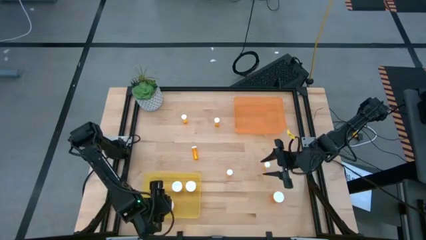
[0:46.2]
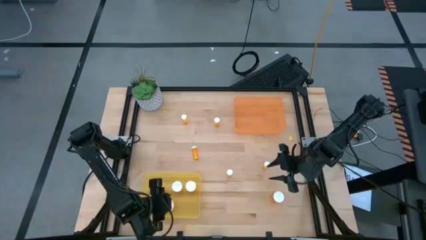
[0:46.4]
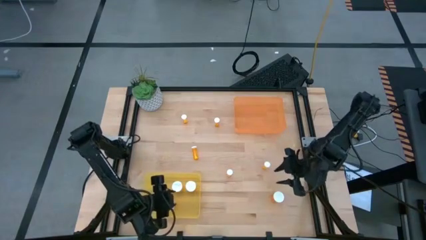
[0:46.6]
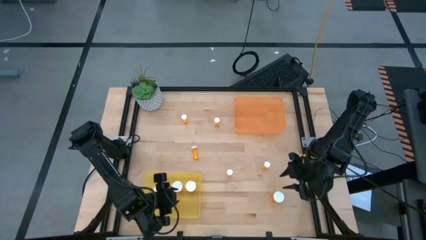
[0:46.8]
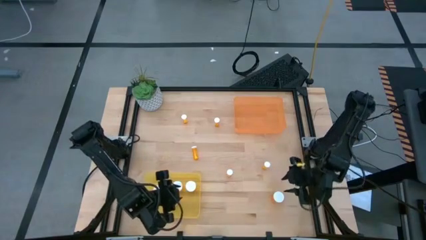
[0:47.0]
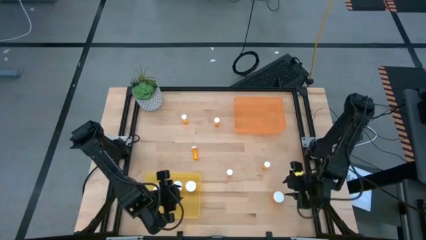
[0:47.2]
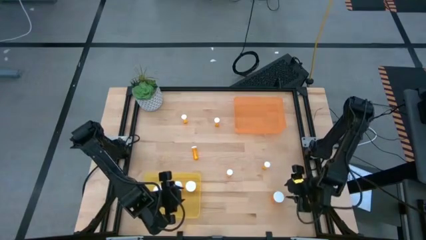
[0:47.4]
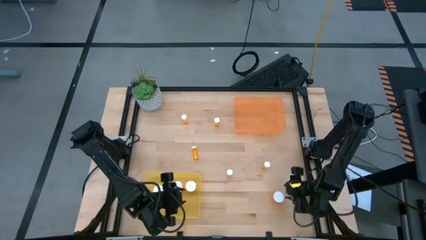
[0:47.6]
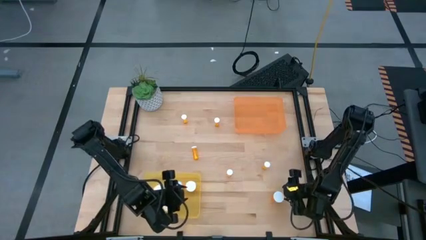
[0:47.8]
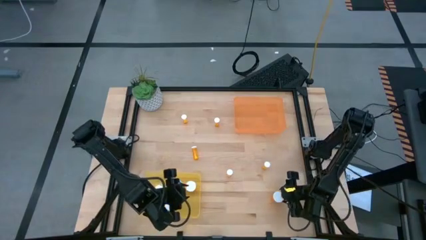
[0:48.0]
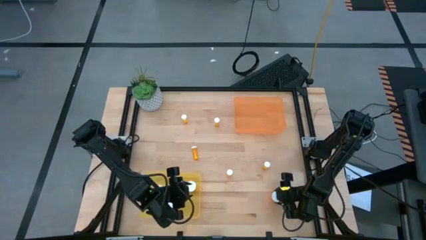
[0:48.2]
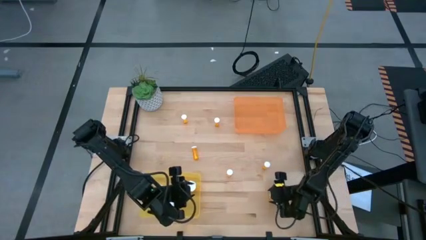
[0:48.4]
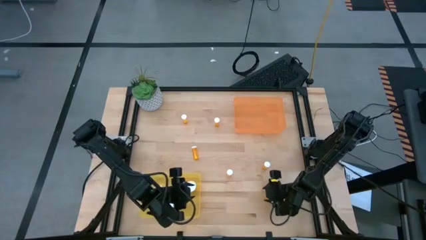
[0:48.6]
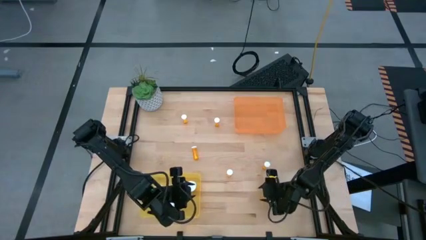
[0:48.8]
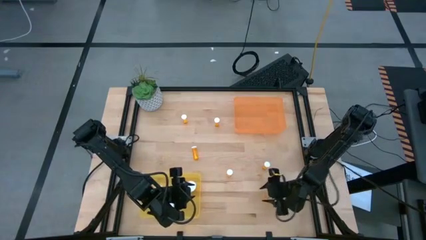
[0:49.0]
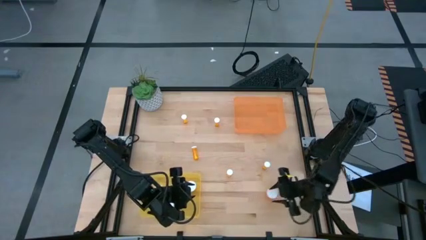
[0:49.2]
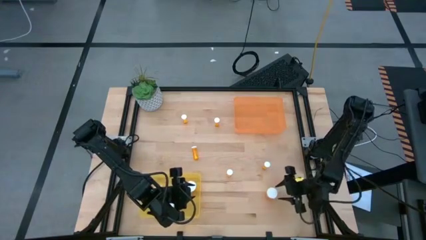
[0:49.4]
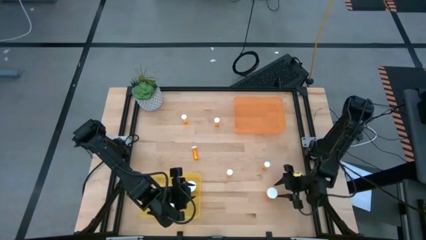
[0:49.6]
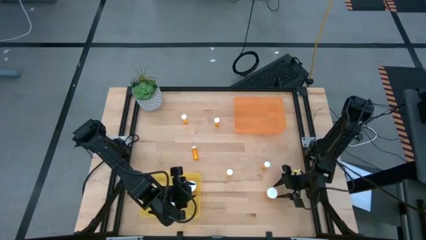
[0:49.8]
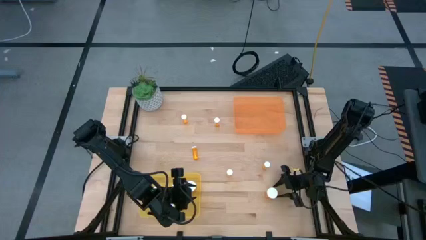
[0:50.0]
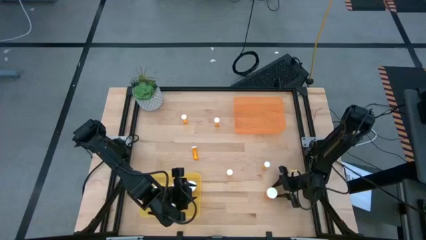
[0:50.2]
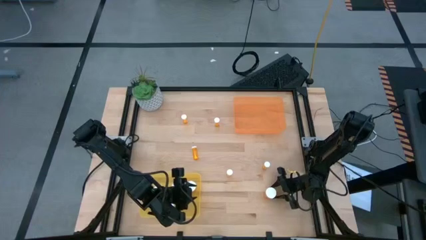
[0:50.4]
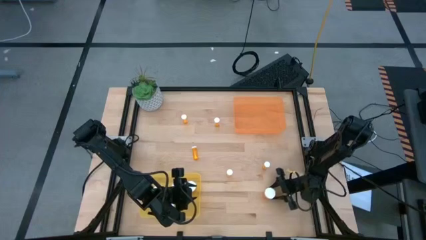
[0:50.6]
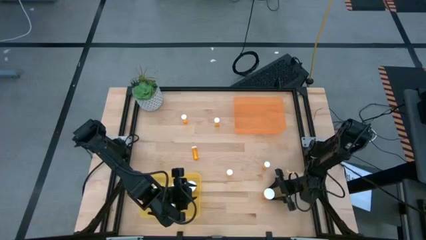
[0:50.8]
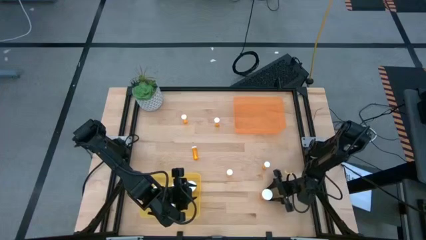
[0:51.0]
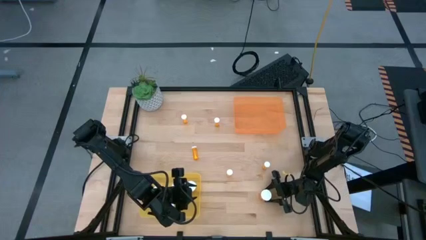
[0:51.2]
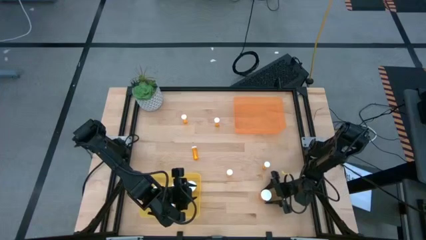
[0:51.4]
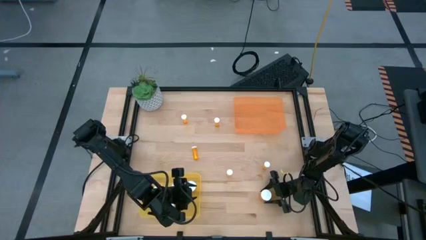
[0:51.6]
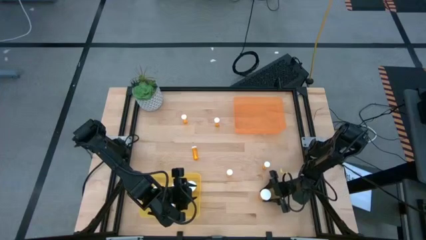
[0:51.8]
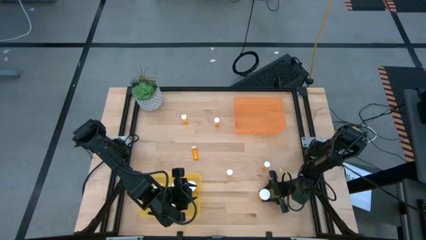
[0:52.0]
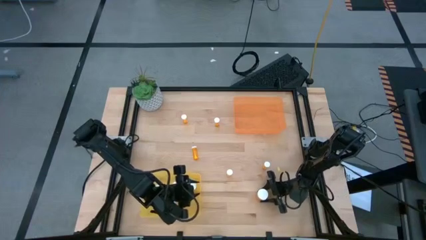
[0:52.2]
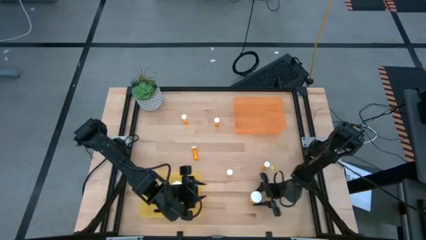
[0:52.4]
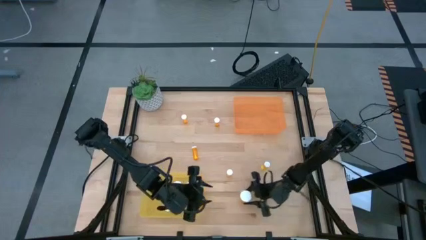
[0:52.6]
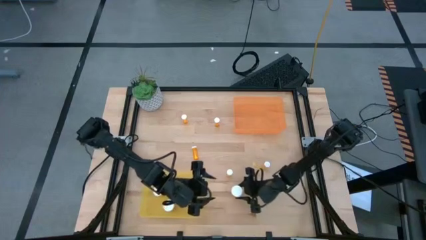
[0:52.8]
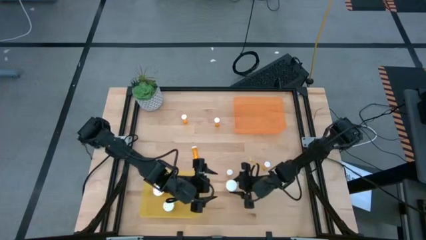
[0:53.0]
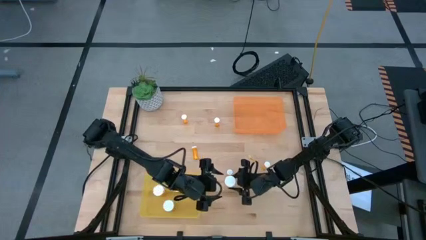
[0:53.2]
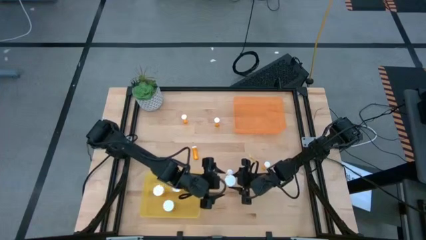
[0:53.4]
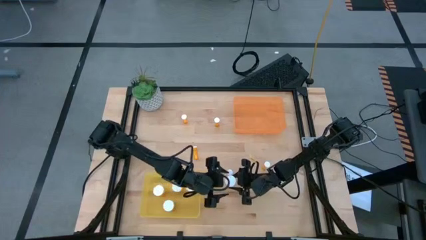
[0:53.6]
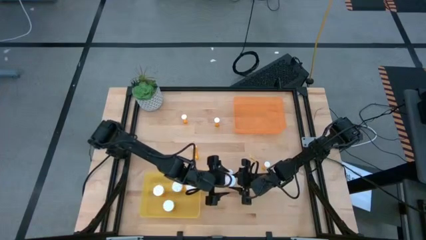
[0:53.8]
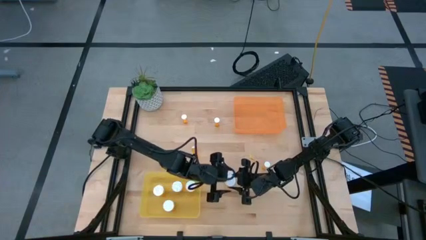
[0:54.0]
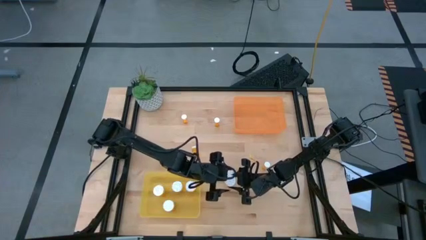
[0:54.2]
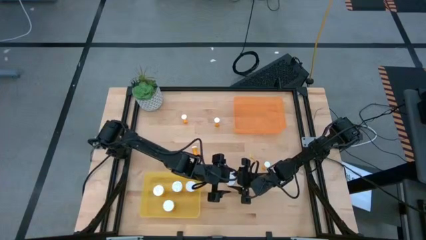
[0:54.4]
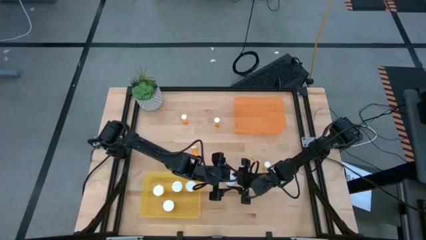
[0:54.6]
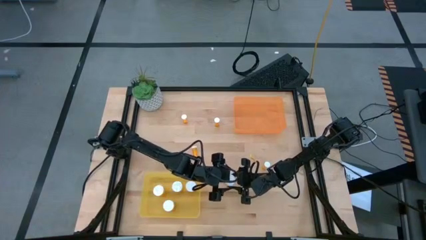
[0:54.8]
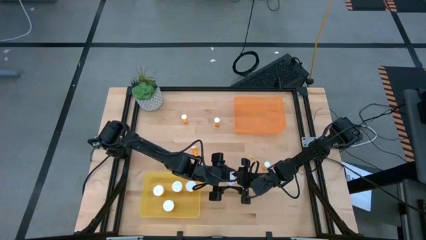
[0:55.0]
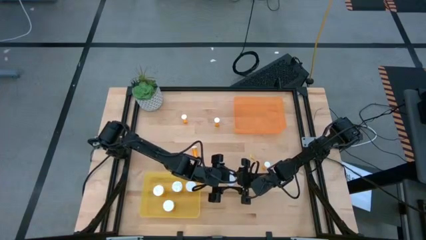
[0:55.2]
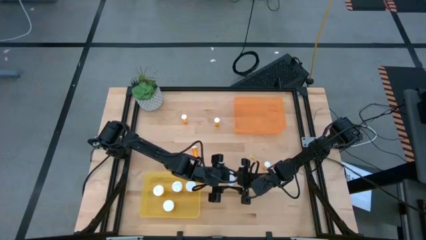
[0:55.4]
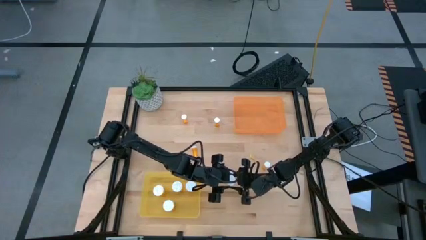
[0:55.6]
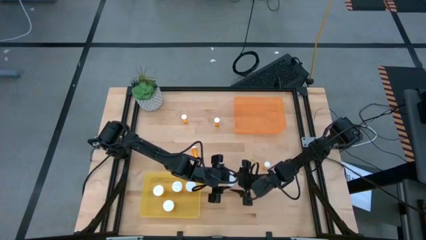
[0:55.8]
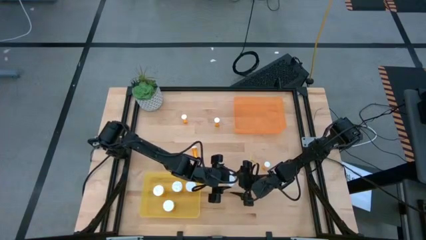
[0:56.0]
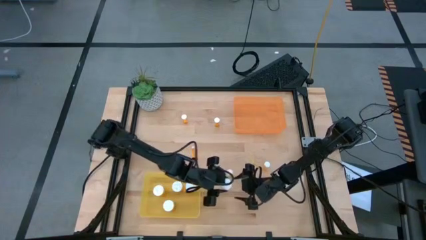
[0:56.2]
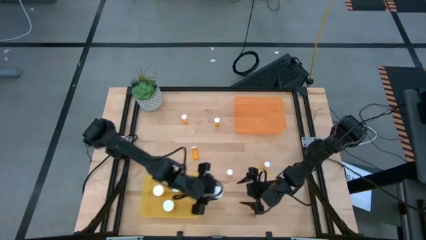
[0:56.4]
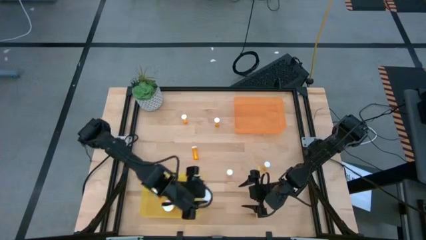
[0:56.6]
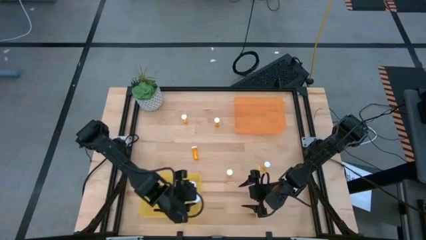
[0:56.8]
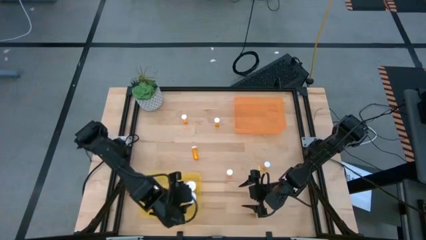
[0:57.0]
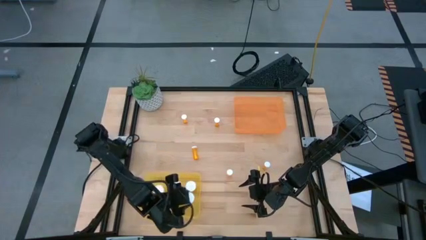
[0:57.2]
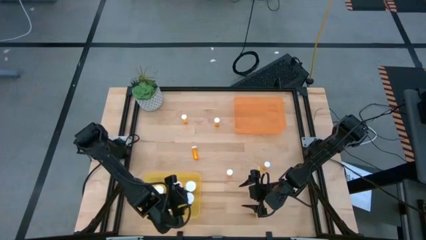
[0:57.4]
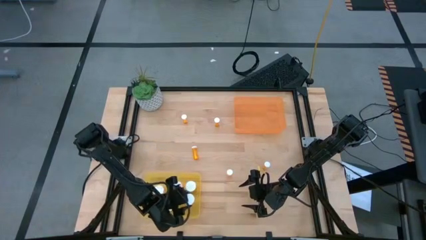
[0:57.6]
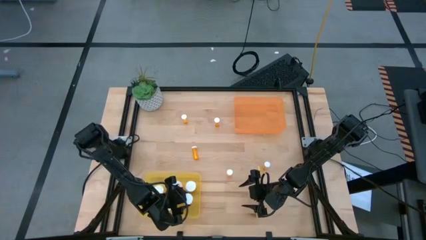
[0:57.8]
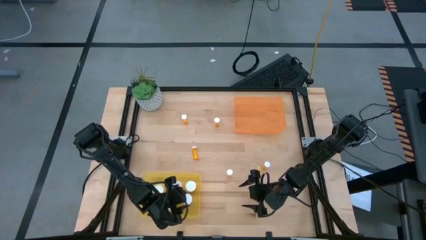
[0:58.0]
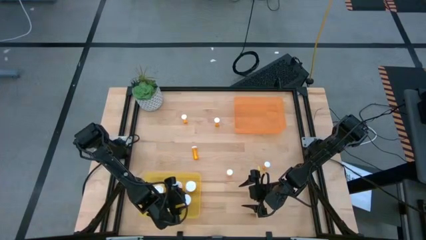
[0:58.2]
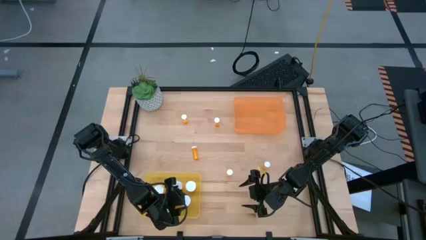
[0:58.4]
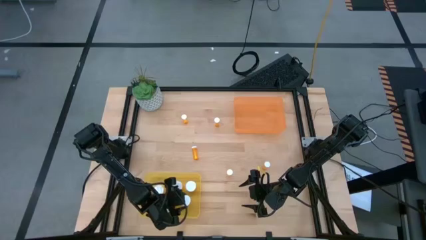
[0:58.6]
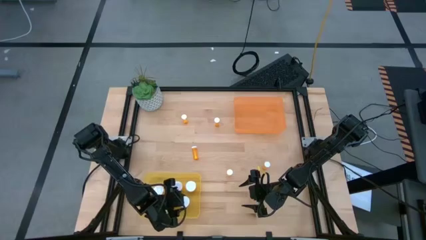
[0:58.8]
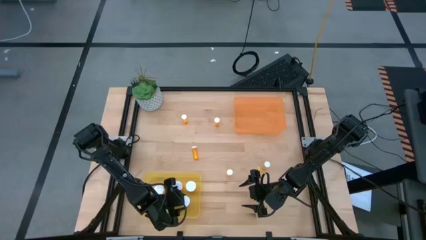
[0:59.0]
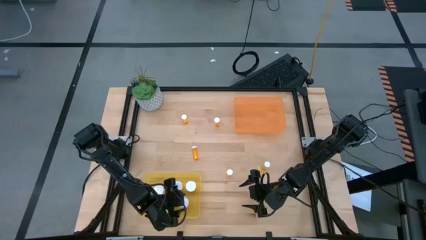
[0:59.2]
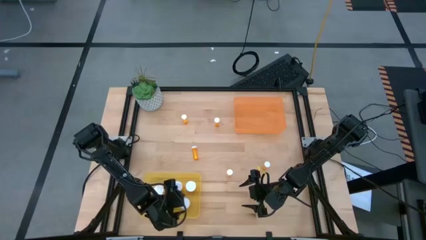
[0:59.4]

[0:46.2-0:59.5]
Task: Pick and place medicine bottles into bin by pill shape (circle, oval)
Put the large pill bottle into the yellow bin

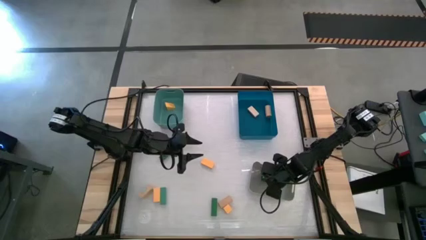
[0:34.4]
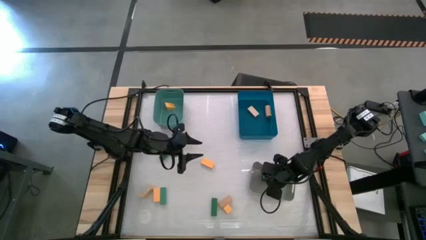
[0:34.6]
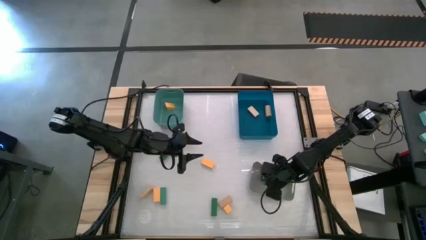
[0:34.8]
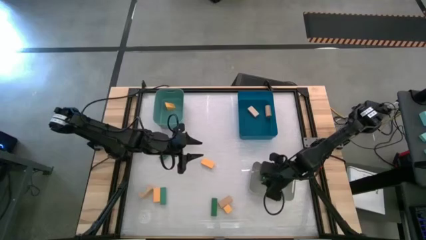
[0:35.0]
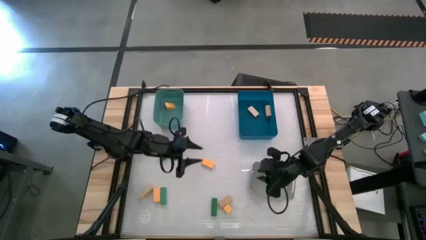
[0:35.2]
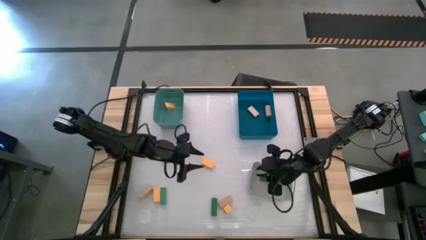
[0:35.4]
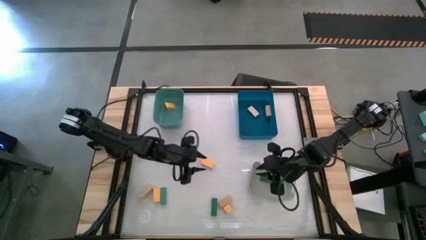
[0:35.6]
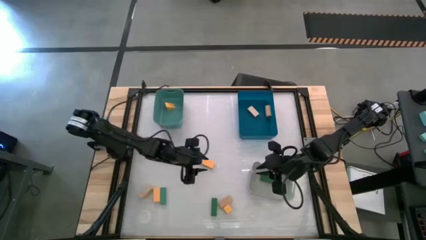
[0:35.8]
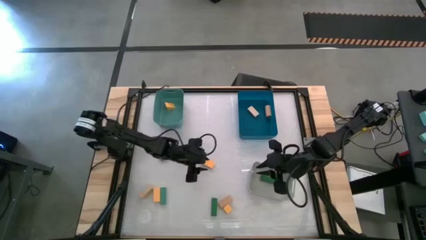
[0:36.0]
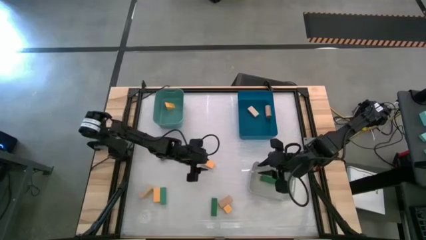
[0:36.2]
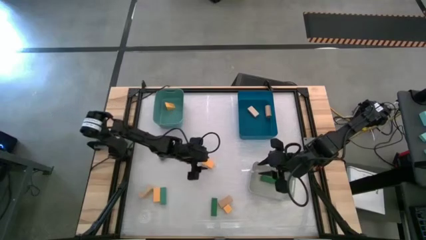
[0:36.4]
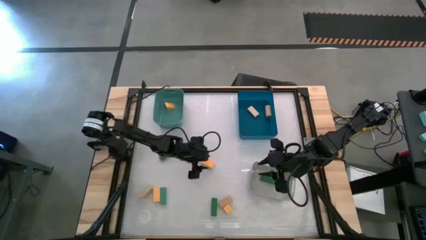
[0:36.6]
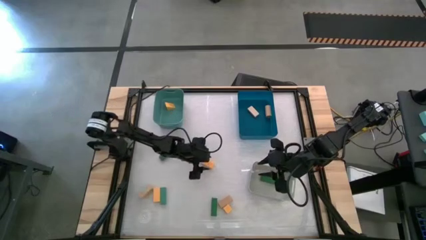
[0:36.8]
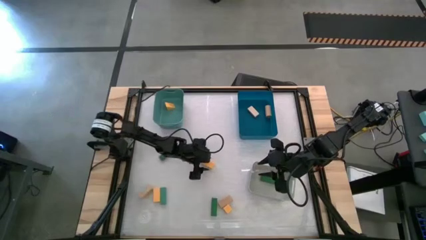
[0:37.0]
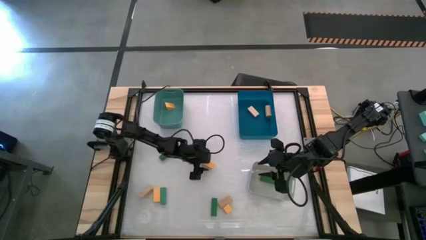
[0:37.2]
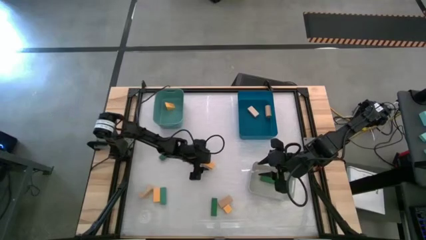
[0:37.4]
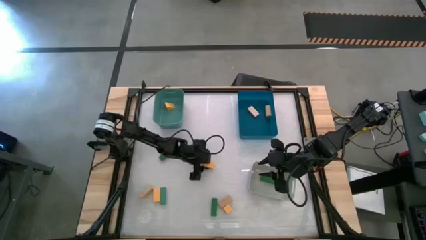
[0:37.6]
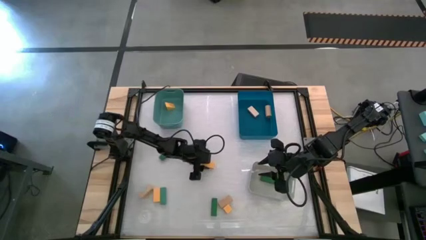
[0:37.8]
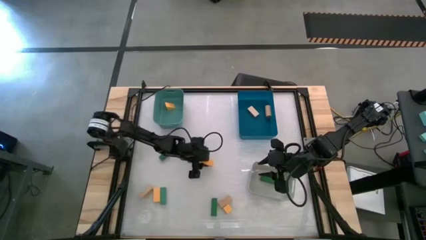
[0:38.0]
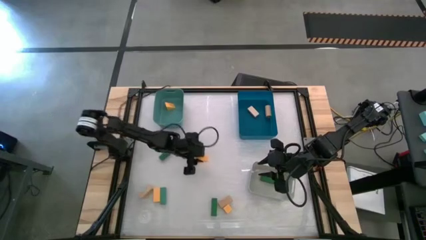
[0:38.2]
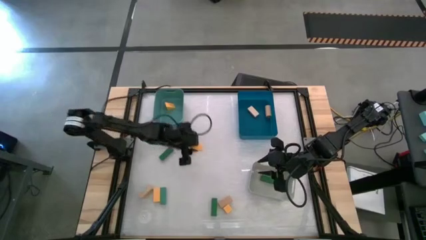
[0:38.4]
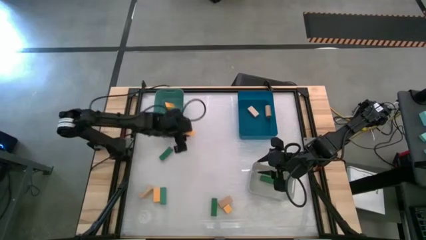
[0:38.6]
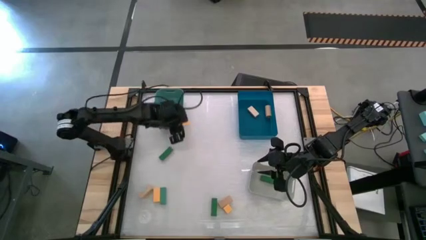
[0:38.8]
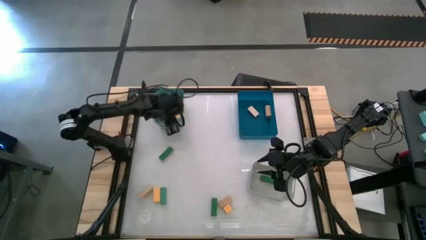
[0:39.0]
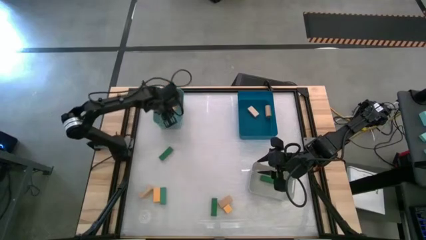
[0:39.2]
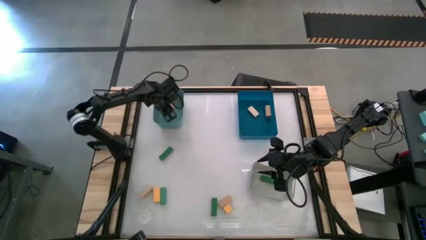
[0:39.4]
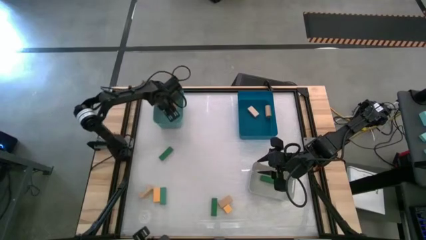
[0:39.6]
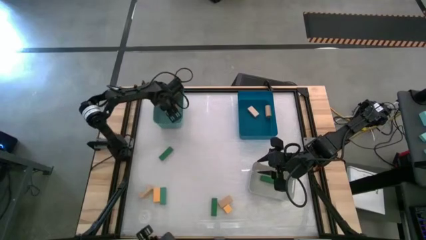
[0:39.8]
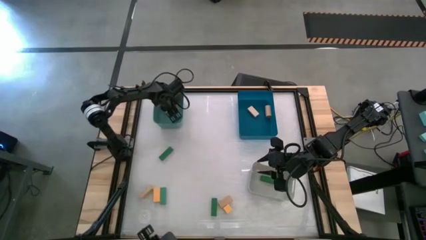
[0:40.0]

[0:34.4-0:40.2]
Task: Sort & place blocks by color
Put the yellow wooden block into the light blue bin
